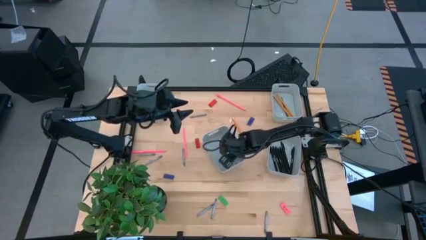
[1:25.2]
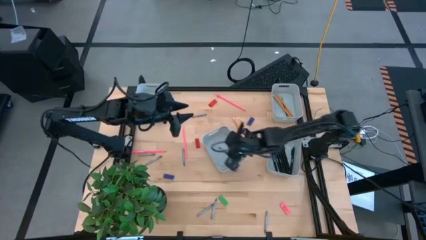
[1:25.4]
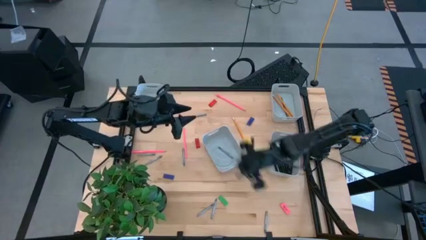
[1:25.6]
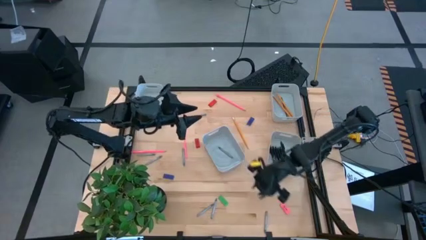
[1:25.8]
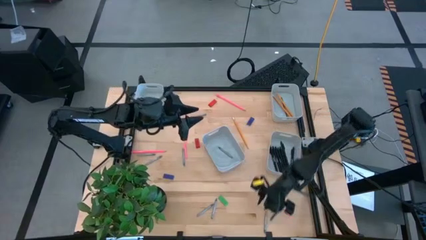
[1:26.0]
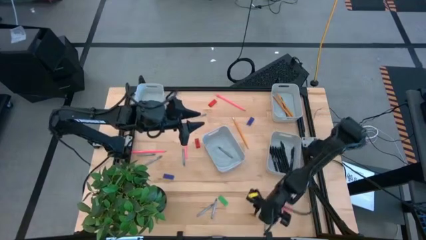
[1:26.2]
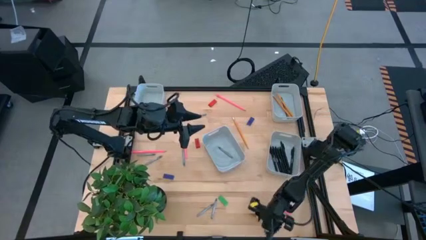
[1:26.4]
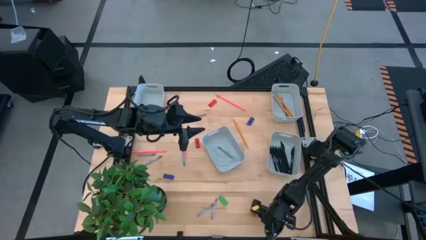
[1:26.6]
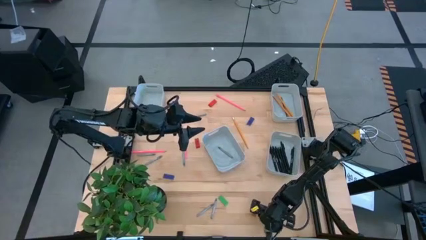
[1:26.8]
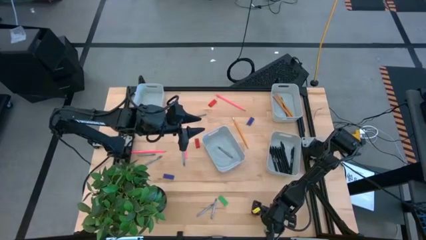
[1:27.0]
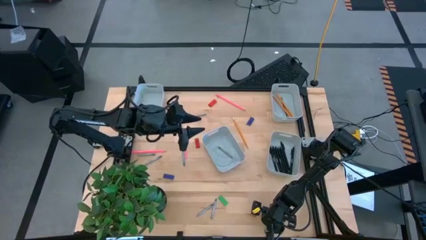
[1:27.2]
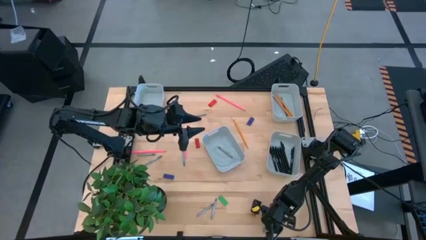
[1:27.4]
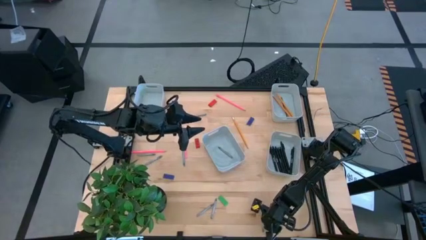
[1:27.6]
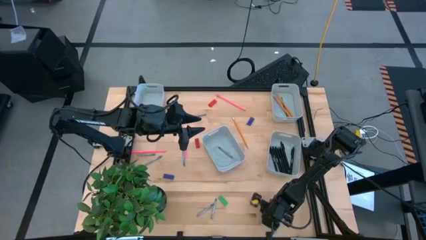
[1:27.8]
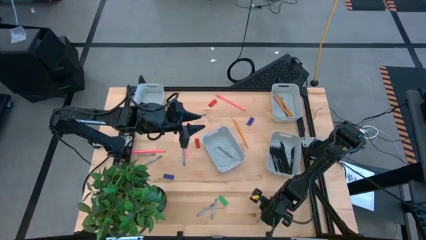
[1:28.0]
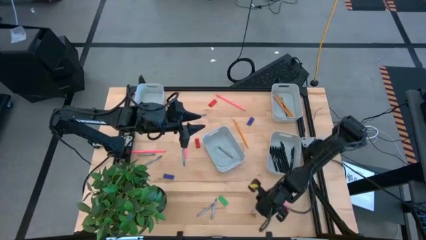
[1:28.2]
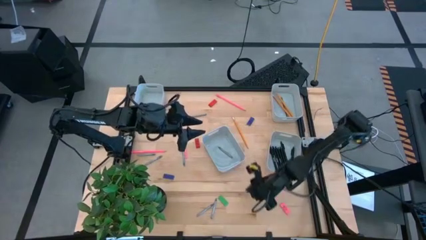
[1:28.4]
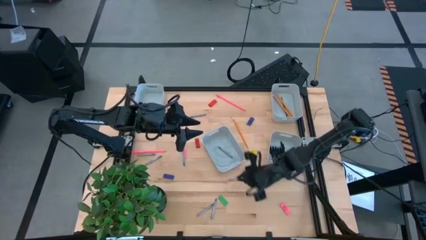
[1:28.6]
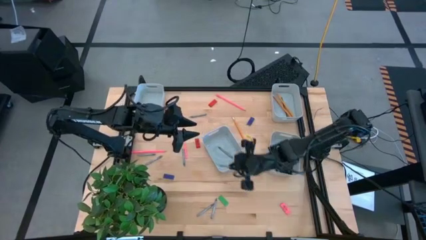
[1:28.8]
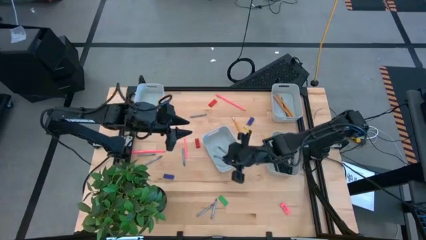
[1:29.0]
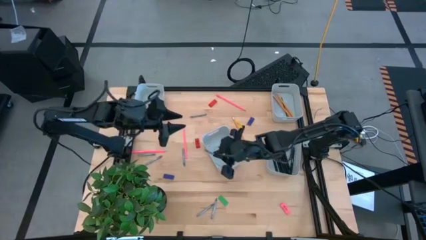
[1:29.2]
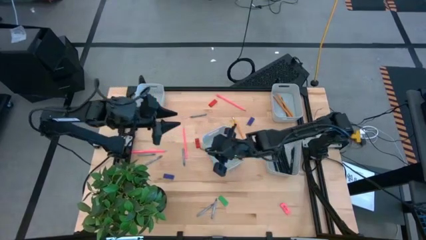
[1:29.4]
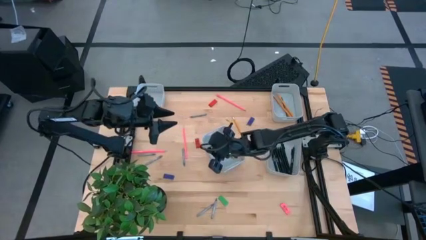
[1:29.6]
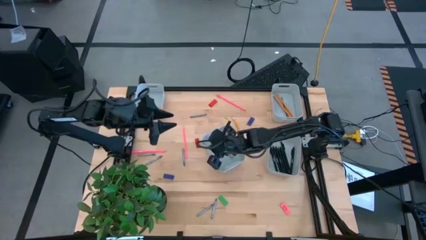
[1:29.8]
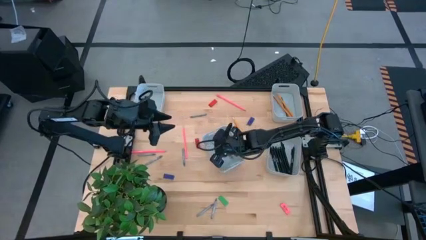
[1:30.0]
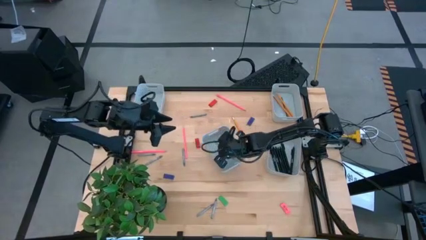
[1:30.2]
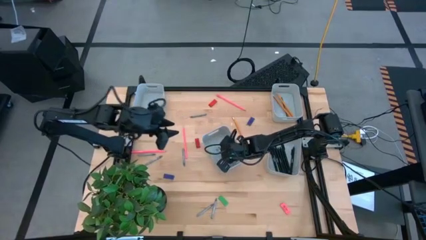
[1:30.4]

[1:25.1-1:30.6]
Task: Sort crayons/erasers/pens/pencils in bins
Put the gray crayon into the bottom left gray bin

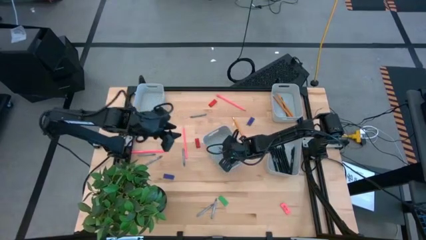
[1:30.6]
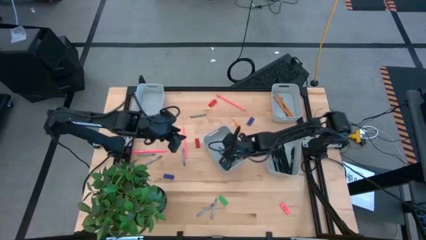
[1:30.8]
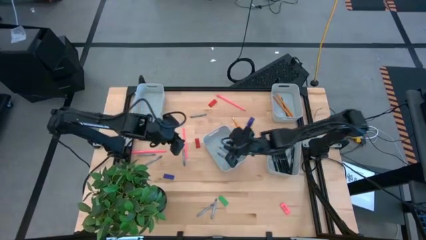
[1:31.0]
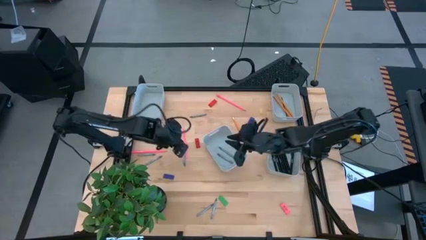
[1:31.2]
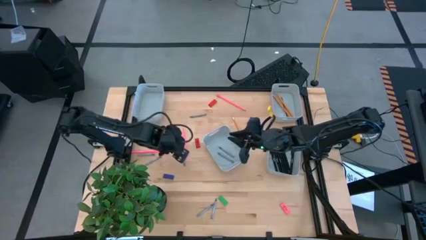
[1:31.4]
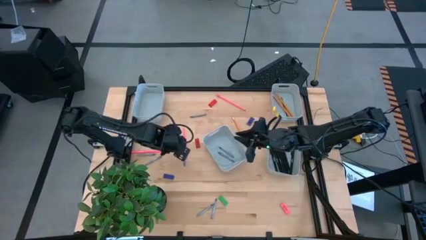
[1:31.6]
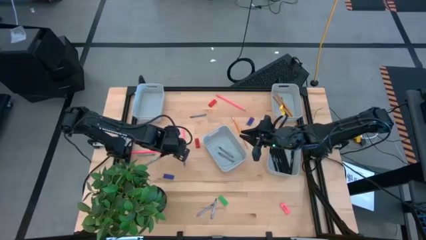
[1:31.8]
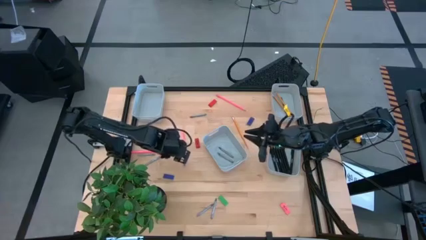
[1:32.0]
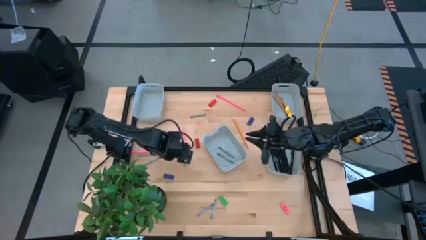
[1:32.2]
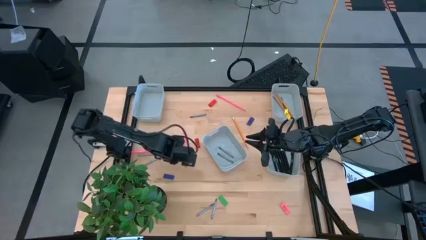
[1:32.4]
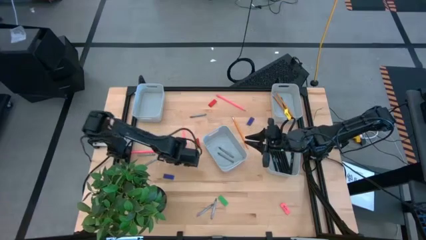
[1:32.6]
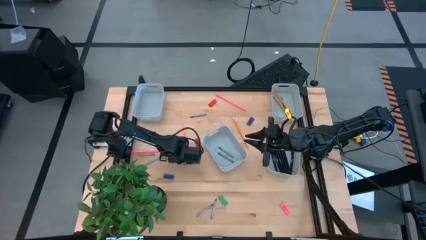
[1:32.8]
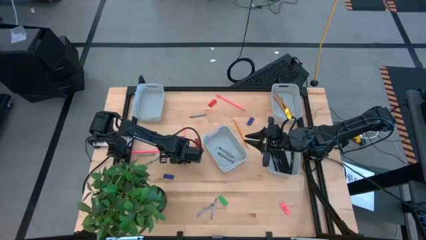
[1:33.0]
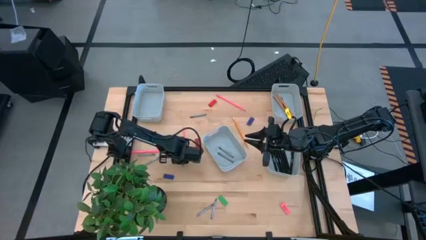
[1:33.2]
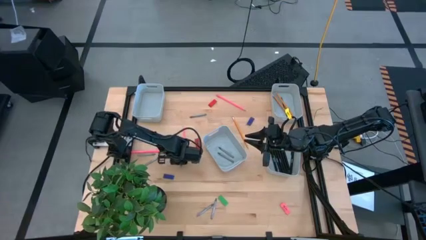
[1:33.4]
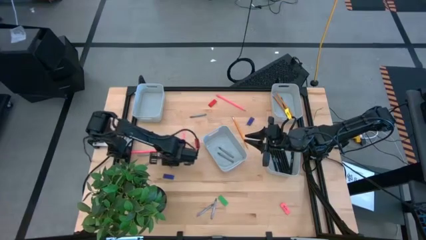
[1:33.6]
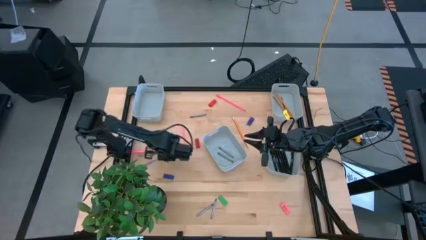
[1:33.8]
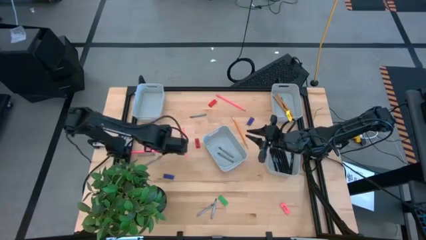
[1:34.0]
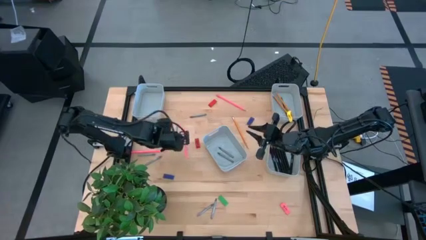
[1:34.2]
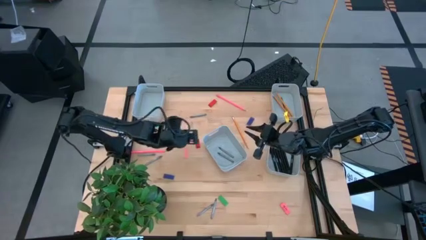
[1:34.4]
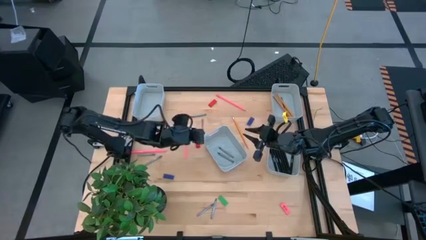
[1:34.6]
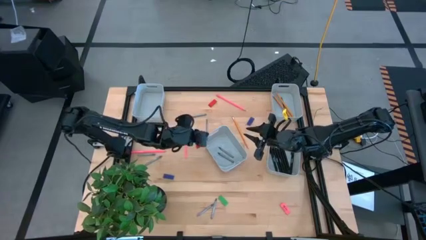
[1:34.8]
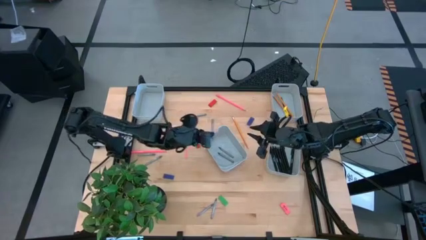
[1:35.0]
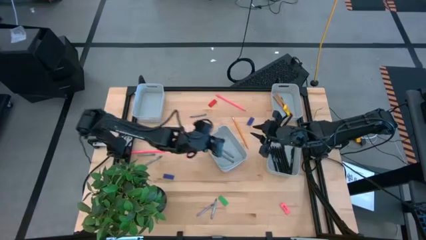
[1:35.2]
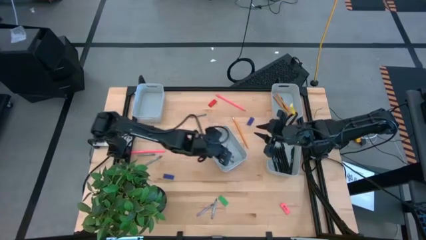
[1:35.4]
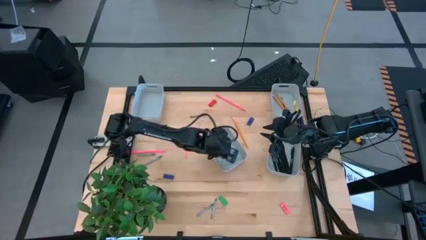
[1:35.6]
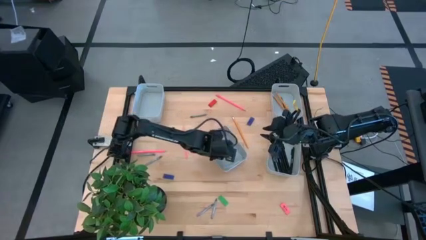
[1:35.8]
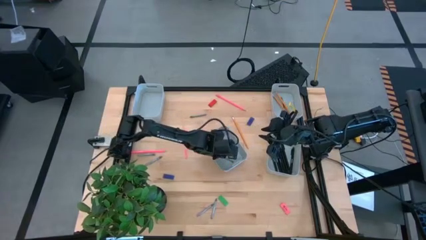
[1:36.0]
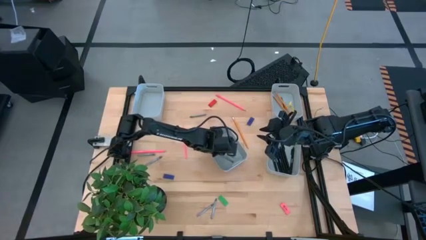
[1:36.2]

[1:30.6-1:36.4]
Put the gray crayon into the bottom left gray bin

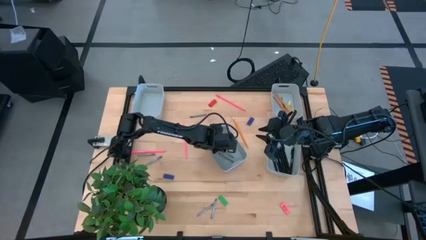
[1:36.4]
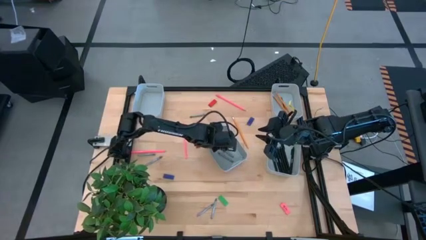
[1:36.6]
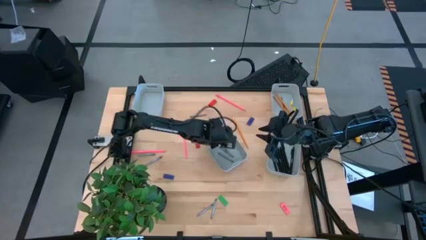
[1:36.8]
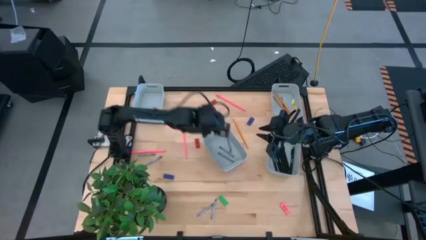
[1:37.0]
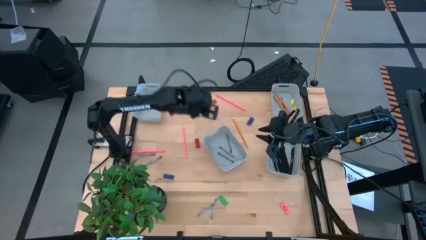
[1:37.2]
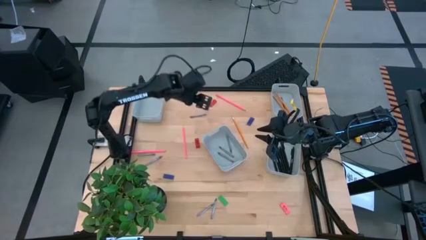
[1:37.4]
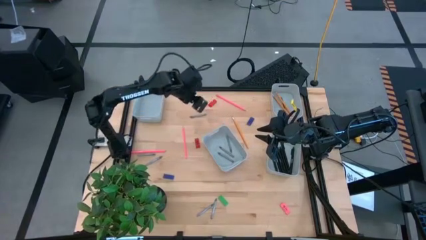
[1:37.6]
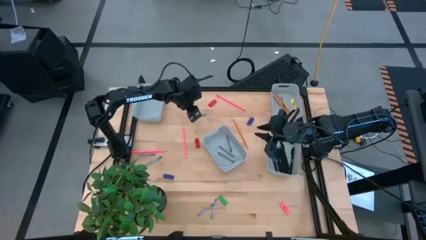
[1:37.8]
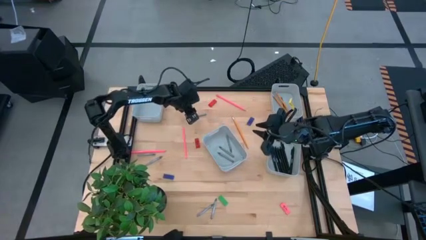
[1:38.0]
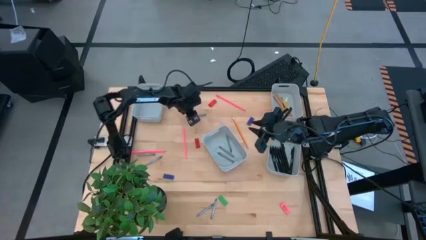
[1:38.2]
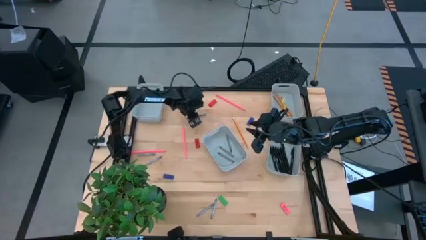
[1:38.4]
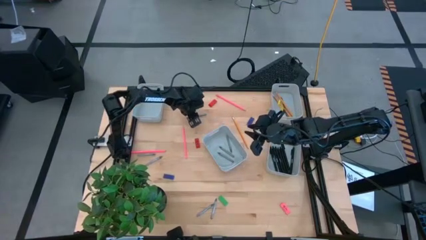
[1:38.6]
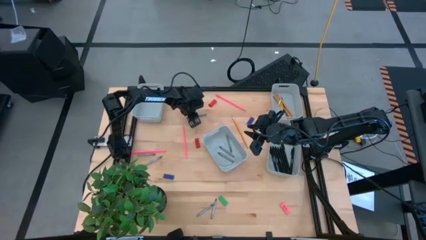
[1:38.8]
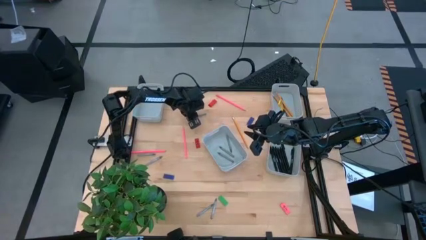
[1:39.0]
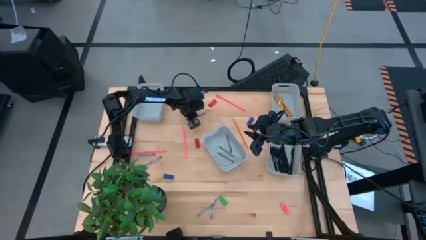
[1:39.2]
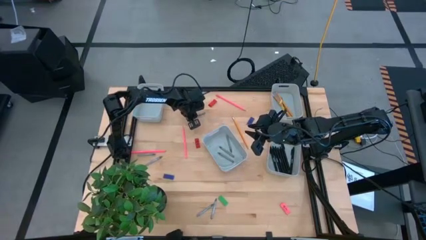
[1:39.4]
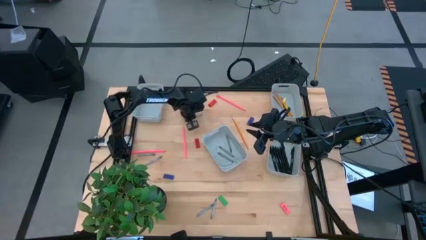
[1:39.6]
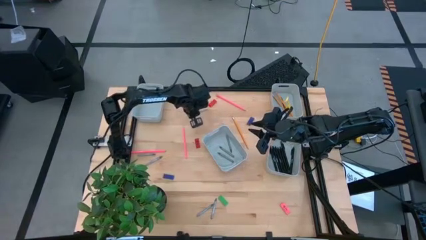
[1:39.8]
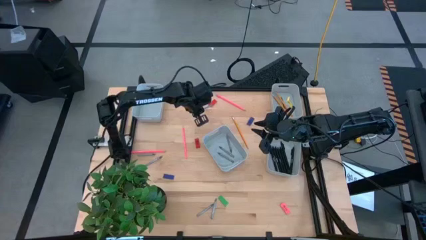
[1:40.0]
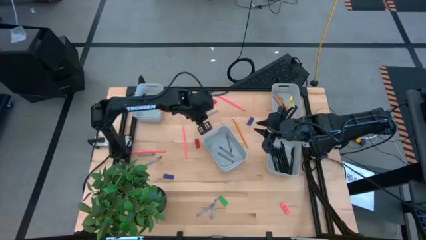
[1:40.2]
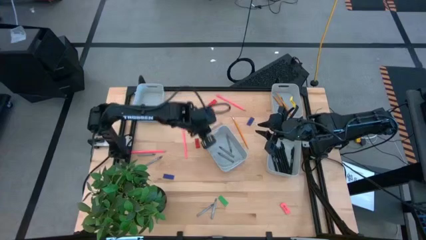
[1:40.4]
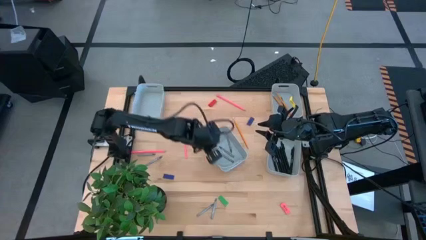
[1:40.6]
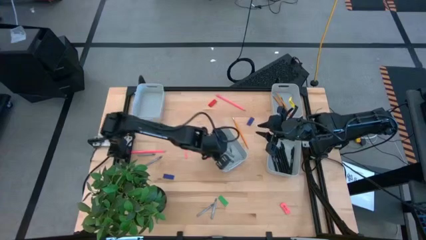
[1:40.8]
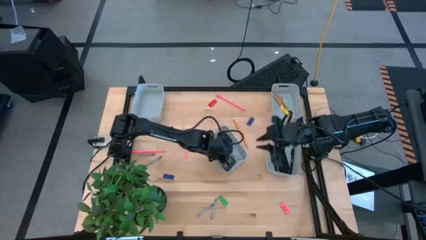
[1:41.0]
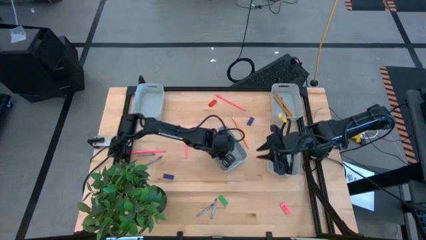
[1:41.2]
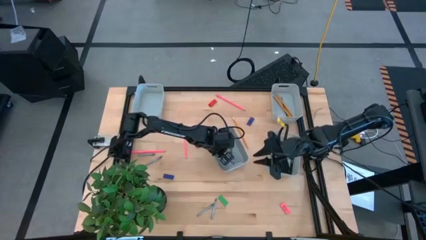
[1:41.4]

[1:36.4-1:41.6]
Put the gray crayon into the bottom left gray bin
